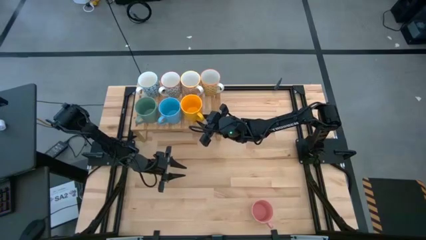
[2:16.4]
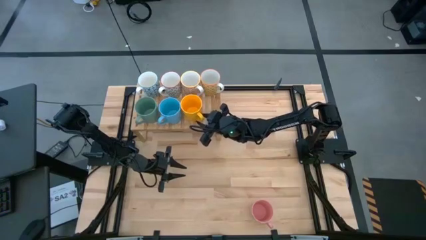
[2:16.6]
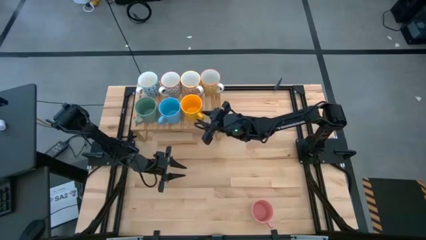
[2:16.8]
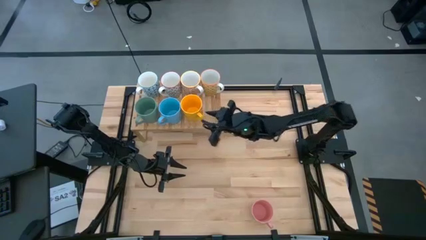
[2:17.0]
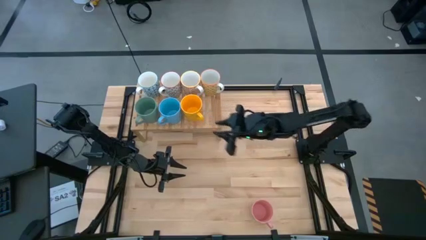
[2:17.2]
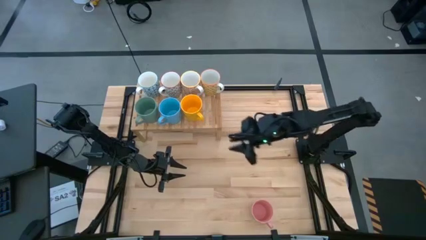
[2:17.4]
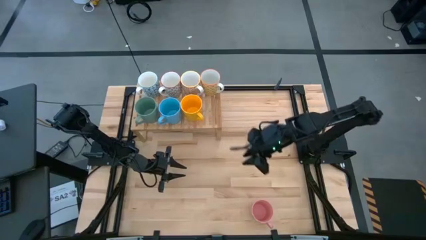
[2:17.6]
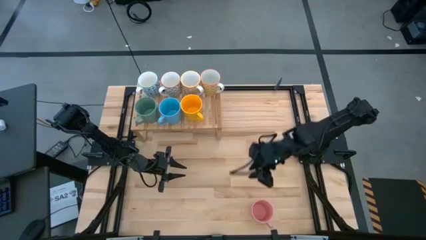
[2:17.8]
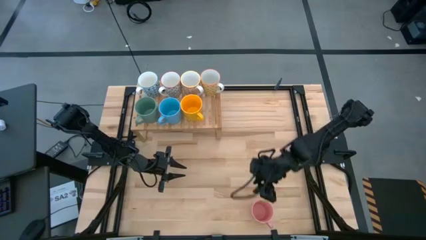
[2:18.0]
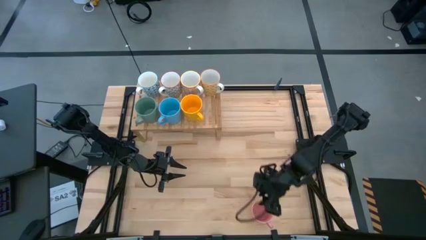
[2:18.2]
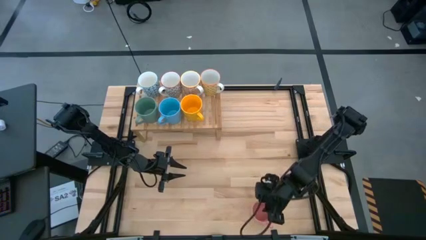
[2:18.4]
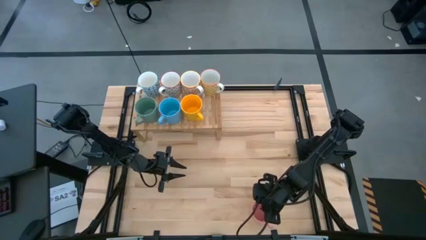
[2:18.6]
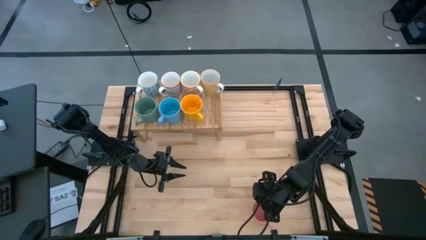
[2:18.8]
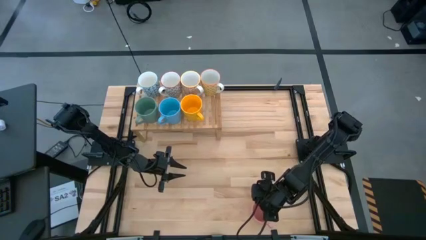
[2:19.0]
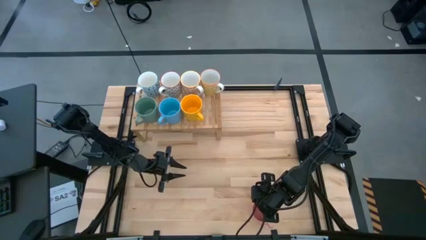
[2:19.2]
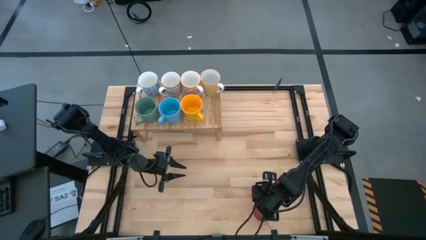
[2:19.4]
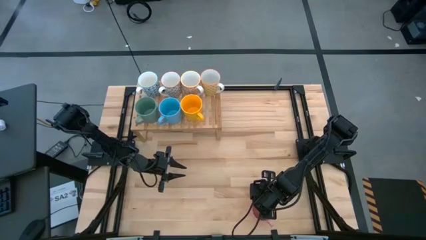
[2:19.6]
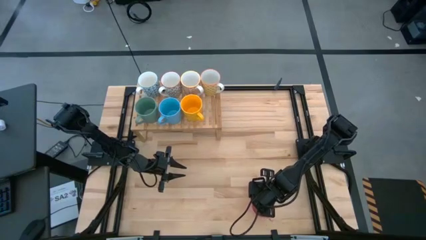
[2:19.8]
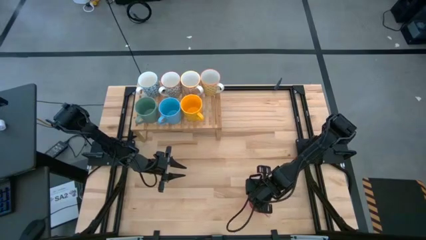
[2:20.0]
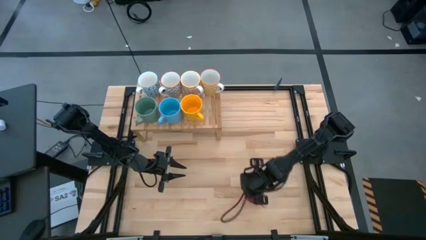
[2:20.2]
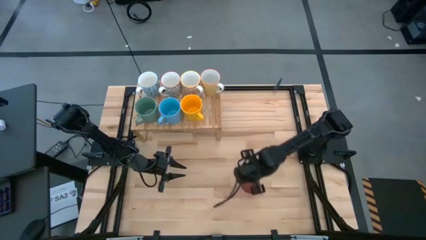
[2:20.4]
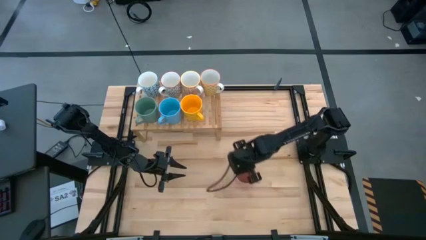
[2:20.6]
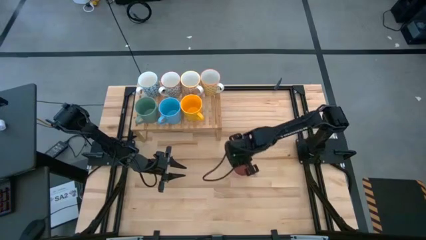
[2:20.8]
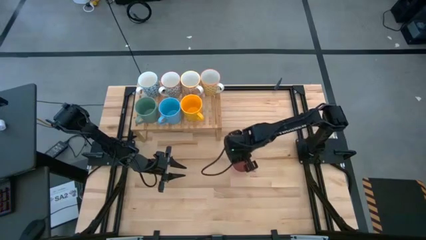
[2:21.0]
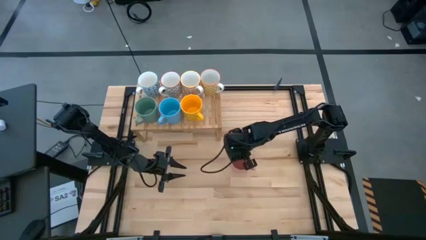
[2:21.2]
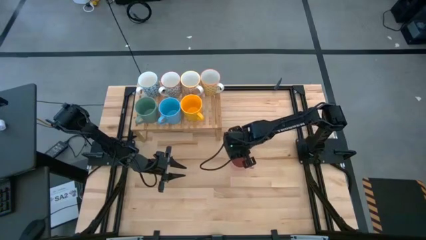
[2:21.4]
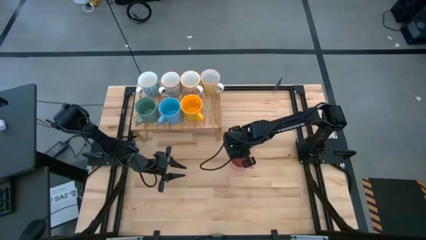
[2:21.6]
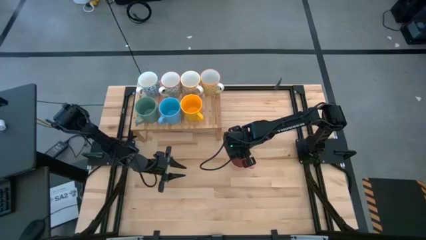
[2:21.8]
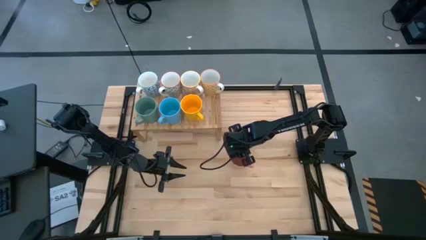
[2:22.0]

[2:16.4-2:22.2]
Task: Place coffee mugs
Move the pink mug to the middle of the table

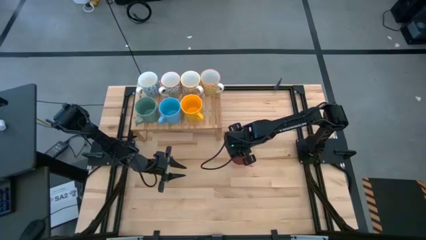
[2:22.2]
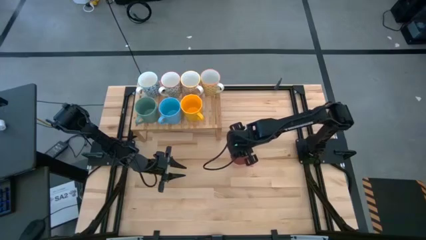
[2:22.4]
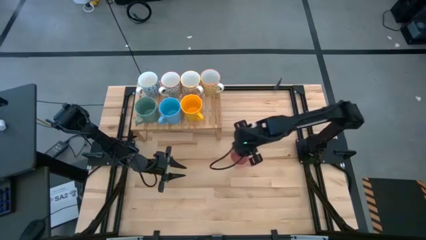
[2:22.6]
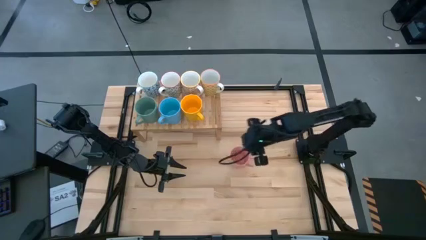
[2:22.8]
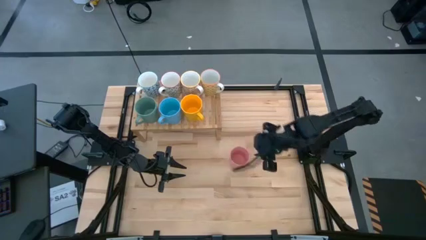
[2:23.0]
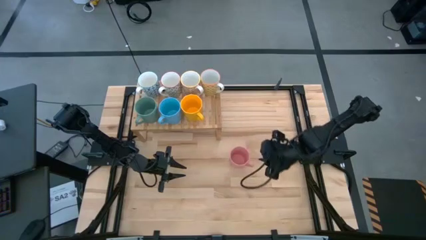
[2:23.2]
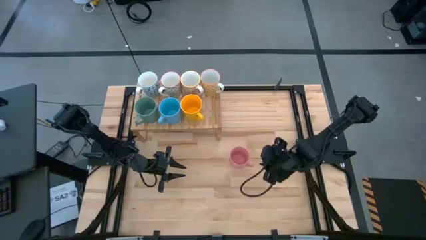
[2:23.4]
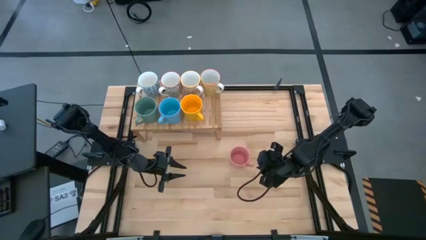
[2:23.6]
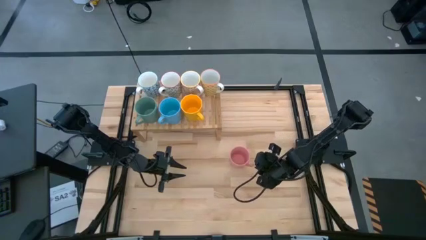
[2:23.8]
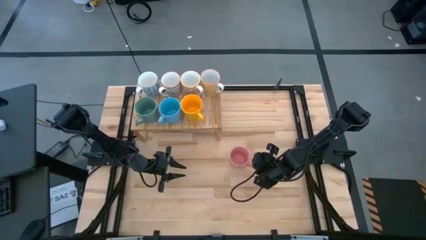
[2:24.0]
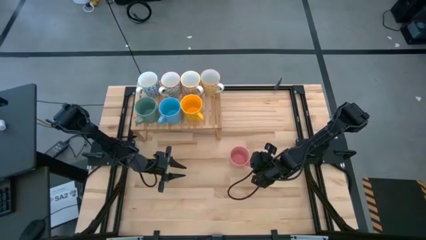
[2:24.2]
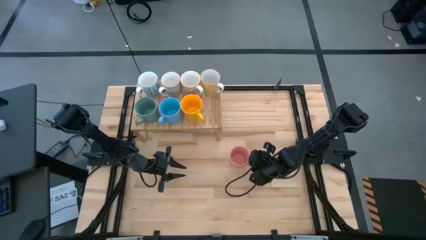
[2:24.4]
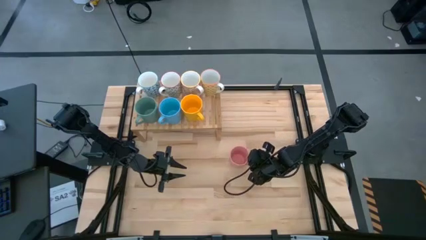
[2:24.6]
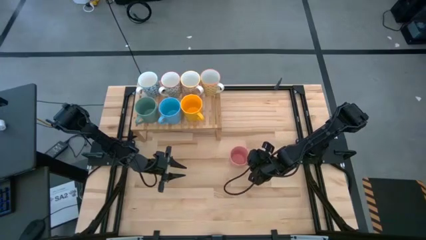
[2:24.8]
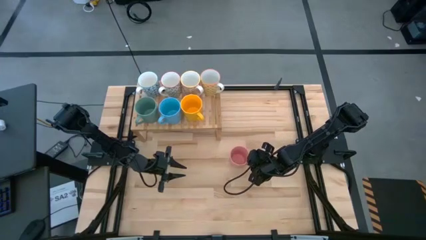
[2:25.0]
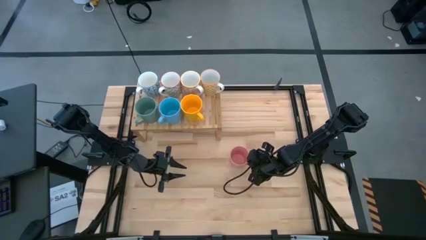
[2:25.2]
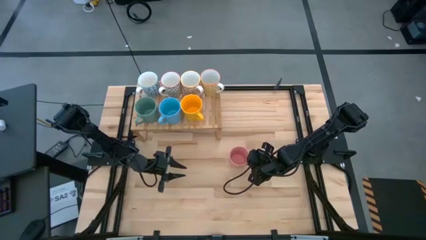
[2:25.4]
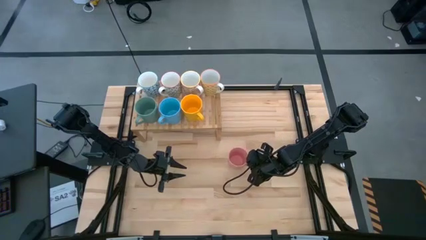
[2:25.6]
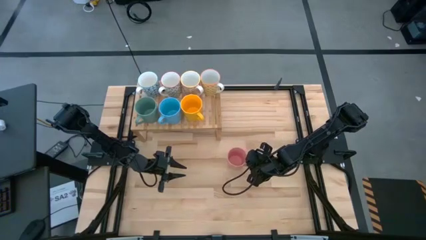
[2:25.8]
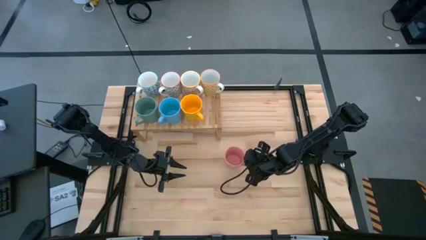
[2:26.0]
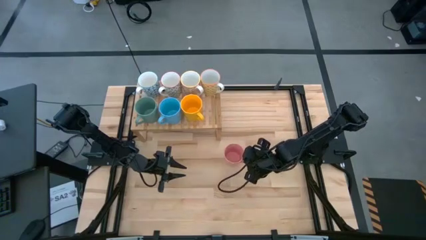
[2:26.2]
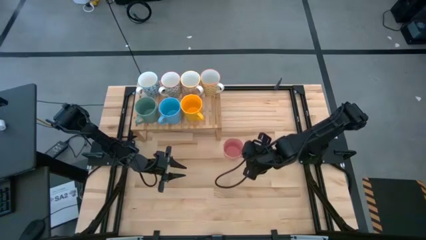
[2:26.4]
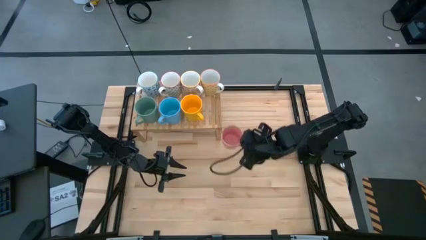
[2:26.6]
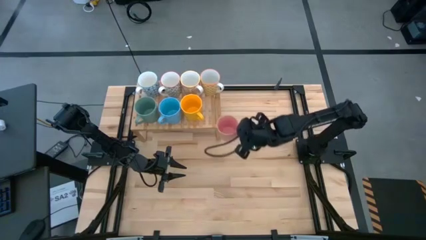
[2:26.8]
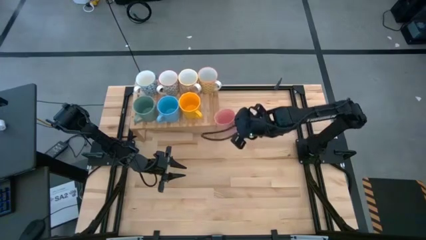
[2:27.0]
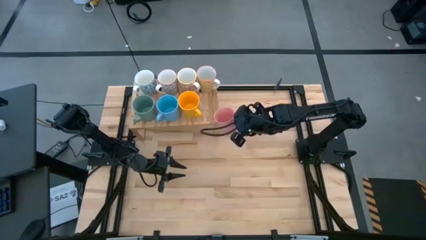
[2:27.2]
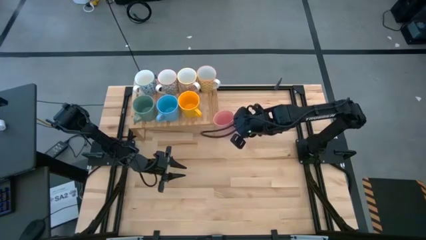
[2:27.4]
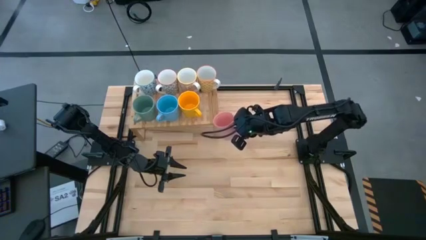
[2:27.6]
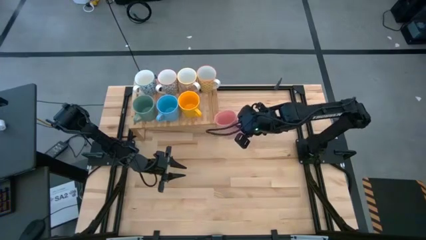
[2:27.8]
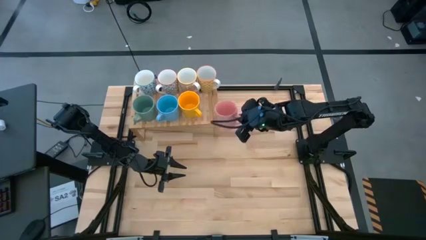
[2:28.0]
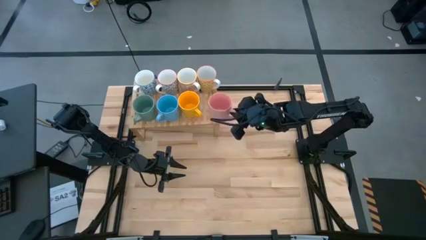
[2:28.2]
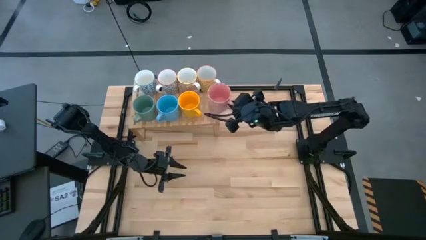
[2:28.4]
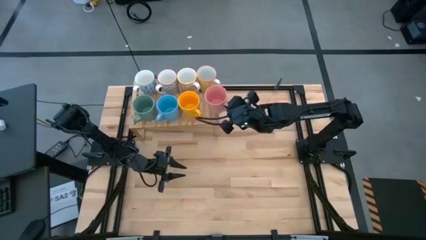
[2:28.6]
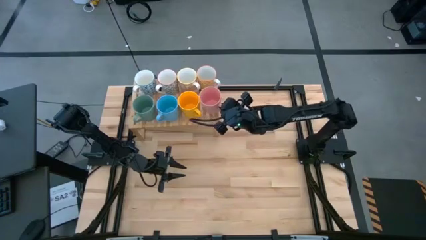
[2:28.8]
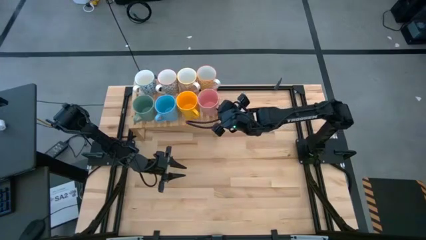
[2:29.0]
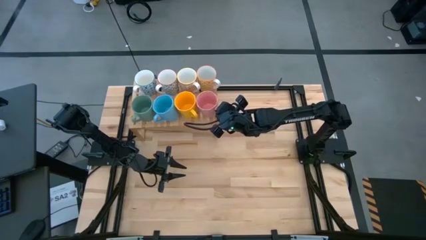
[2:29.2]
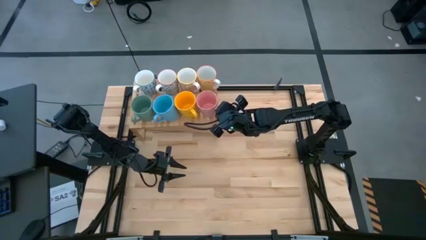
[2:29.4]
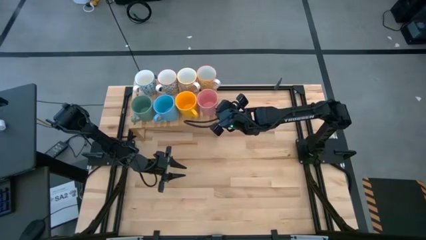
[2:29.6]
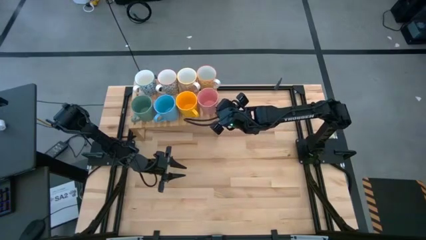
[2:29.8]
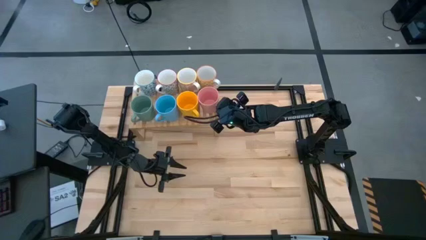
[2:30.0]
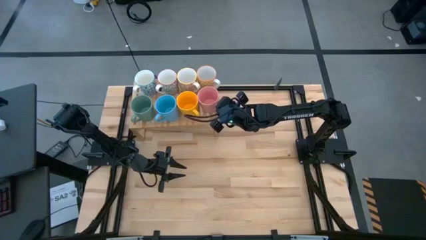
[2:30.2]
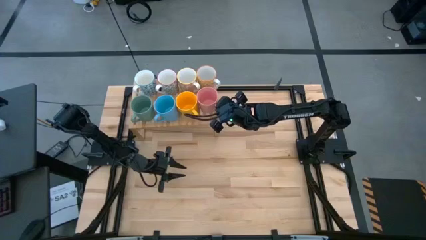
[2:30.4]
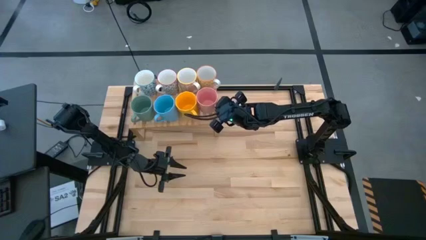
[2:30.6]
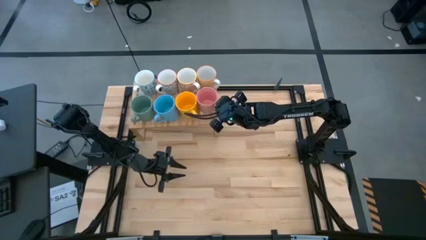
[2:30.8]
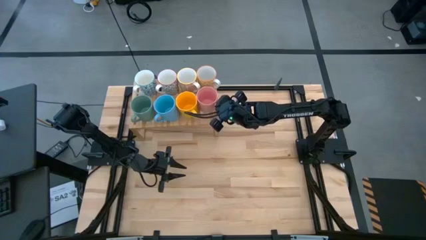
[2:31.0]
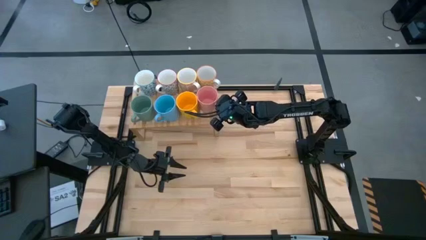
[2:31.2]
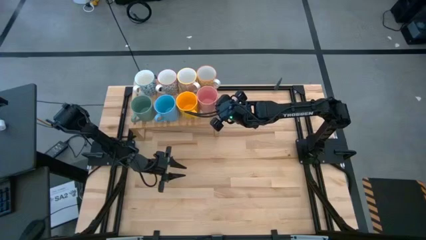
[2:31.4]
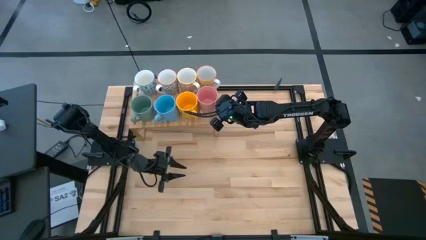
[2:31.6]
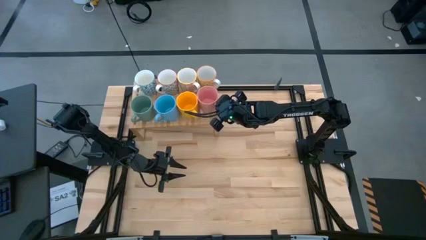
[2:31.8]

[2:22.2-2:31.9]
Put the pink mug on the shelf
